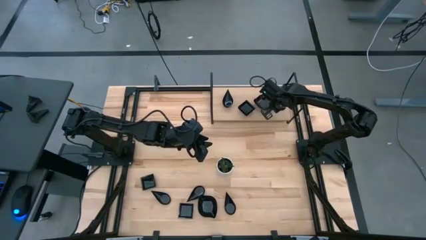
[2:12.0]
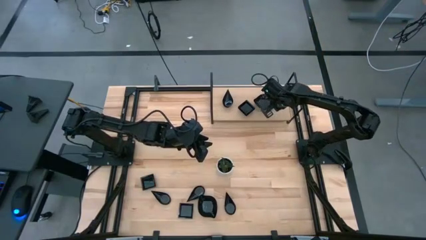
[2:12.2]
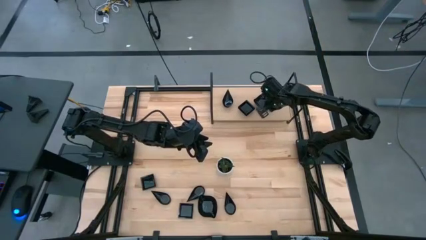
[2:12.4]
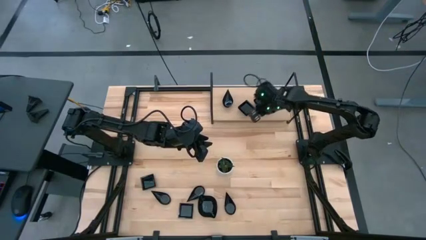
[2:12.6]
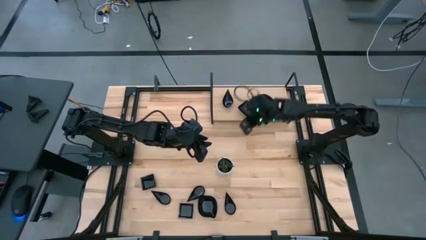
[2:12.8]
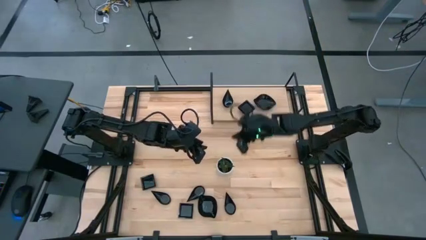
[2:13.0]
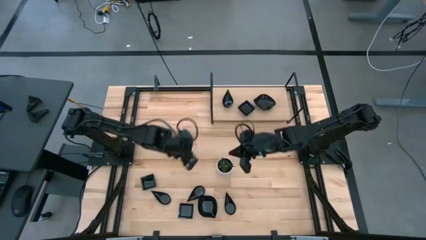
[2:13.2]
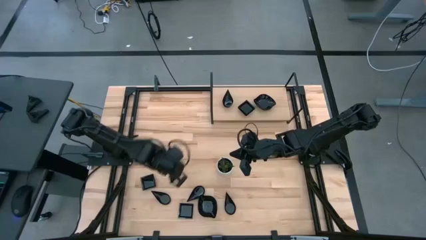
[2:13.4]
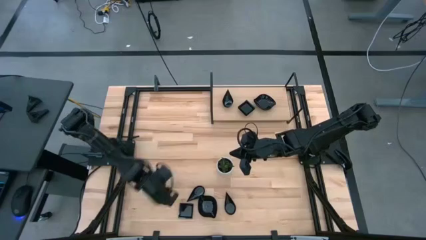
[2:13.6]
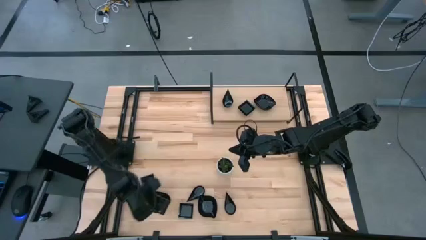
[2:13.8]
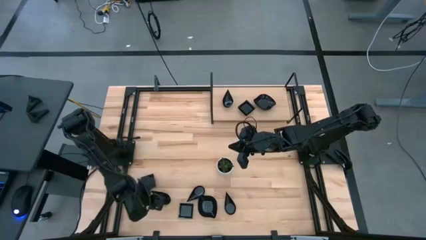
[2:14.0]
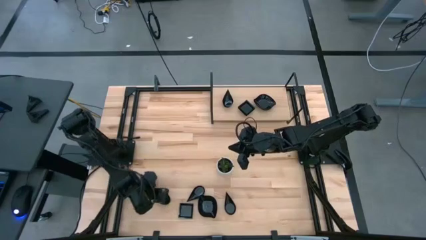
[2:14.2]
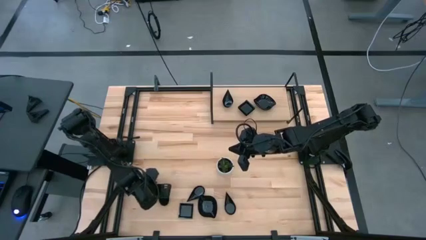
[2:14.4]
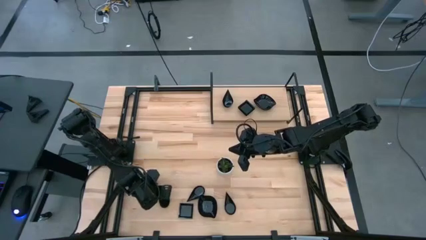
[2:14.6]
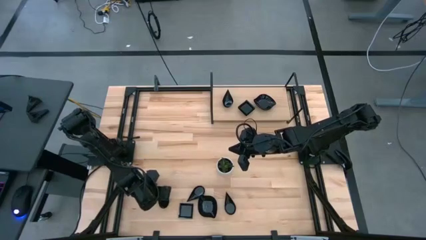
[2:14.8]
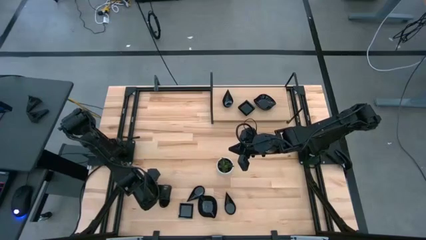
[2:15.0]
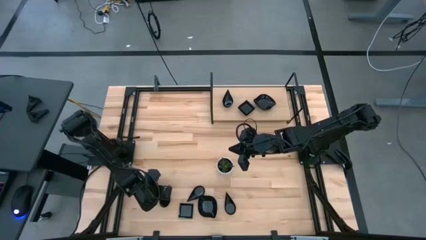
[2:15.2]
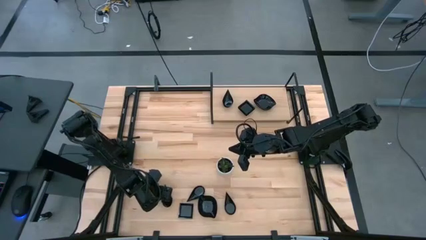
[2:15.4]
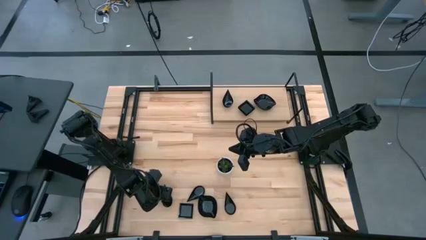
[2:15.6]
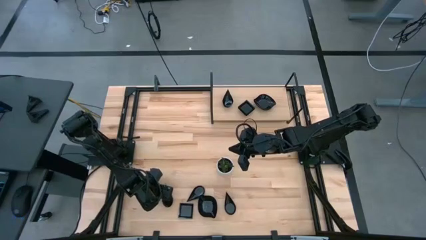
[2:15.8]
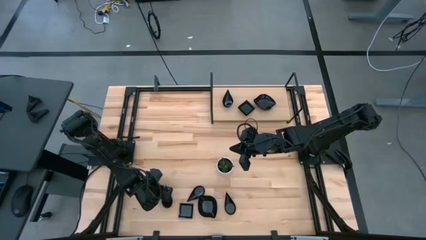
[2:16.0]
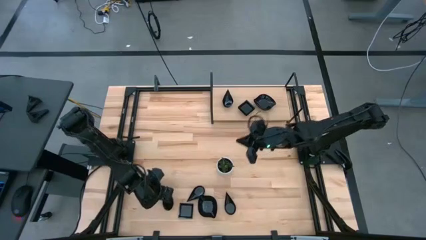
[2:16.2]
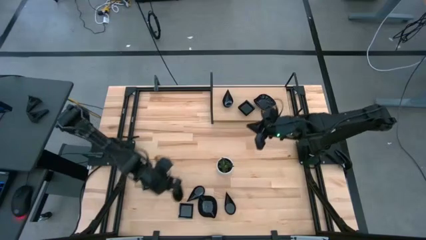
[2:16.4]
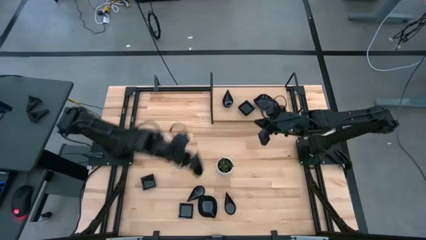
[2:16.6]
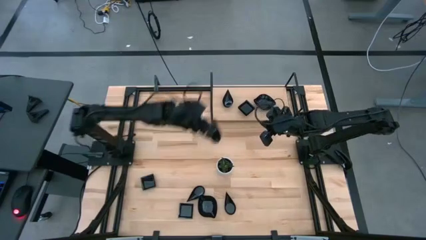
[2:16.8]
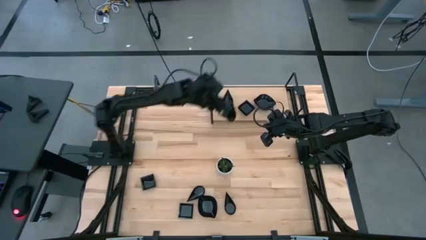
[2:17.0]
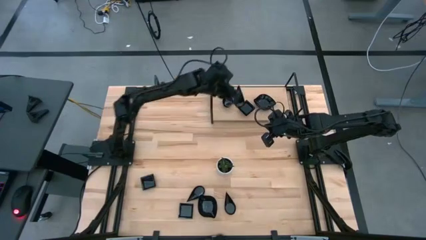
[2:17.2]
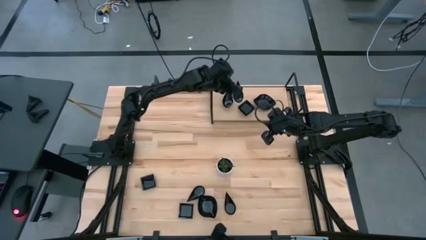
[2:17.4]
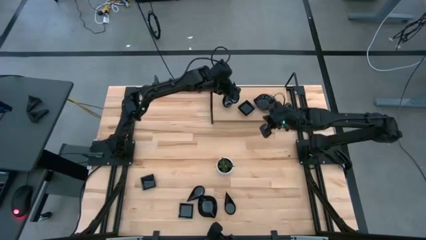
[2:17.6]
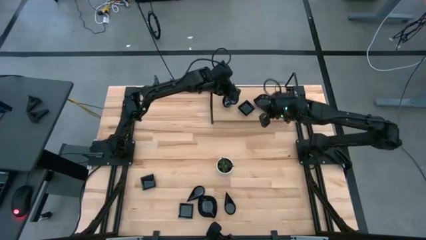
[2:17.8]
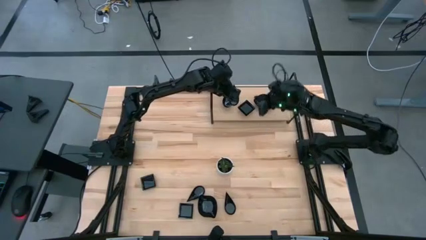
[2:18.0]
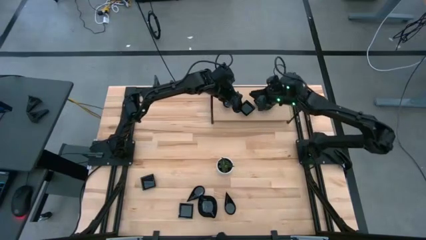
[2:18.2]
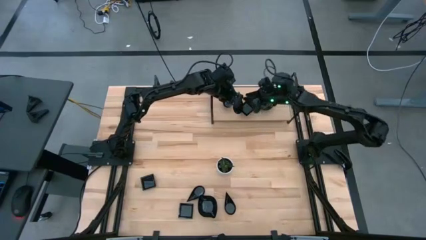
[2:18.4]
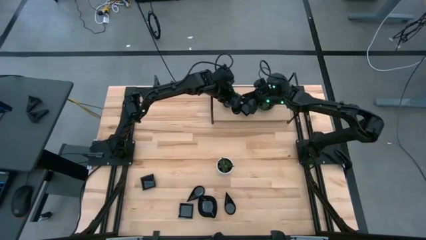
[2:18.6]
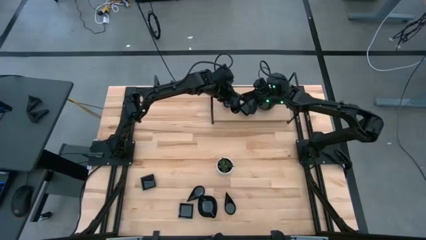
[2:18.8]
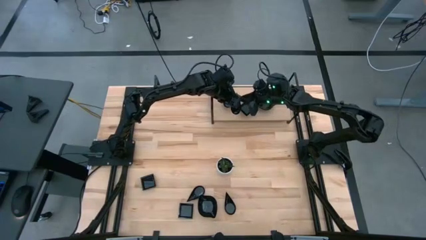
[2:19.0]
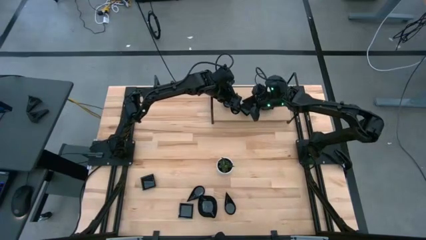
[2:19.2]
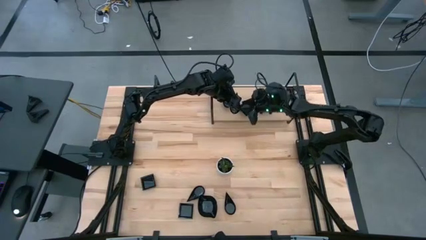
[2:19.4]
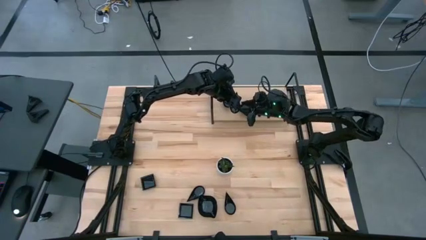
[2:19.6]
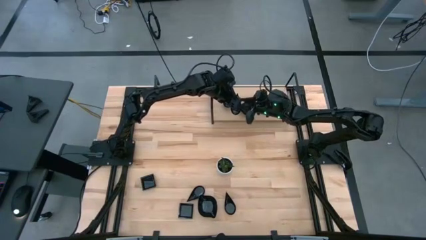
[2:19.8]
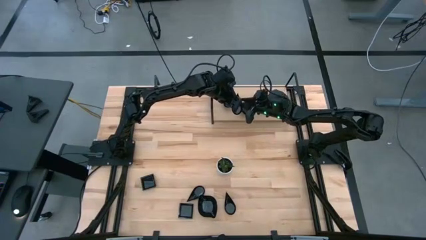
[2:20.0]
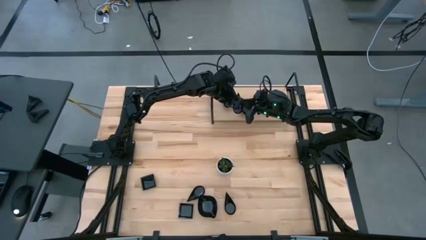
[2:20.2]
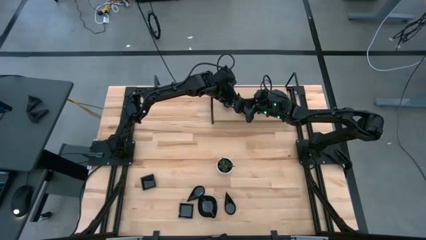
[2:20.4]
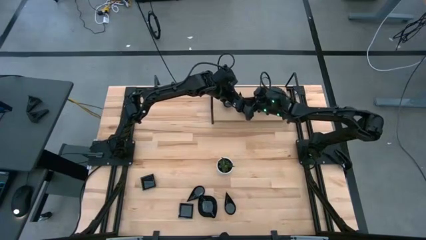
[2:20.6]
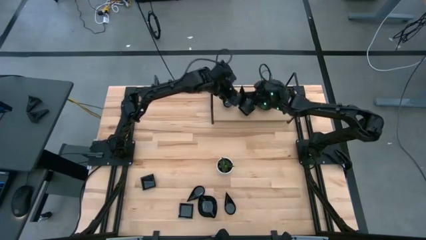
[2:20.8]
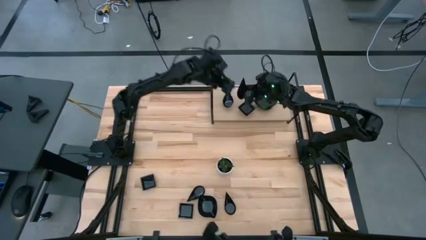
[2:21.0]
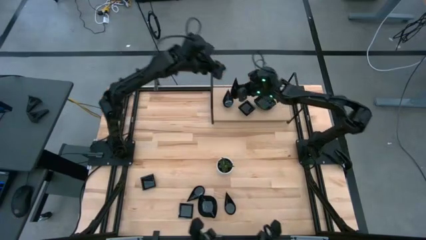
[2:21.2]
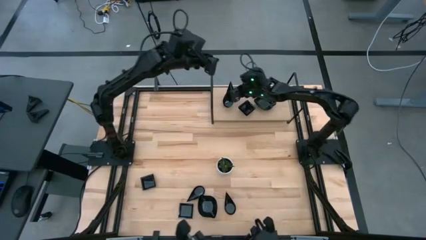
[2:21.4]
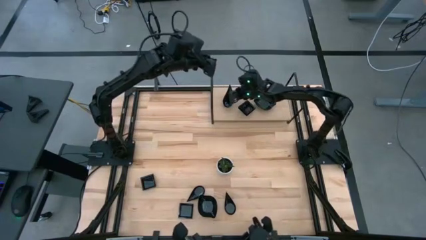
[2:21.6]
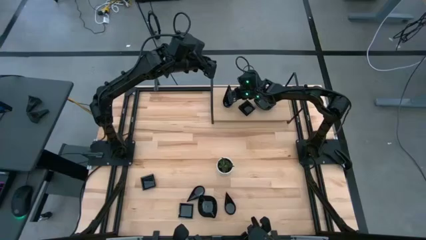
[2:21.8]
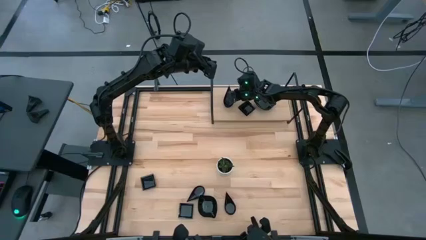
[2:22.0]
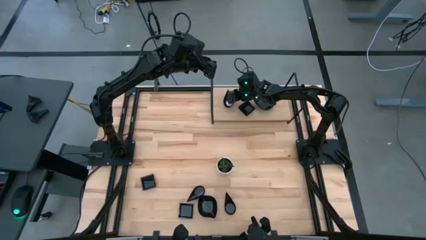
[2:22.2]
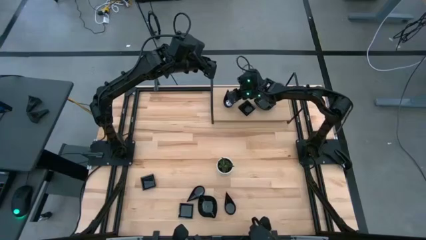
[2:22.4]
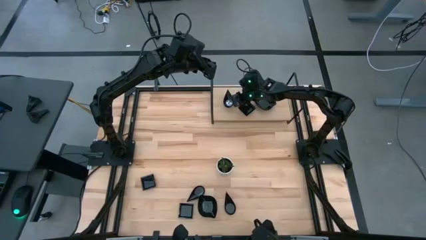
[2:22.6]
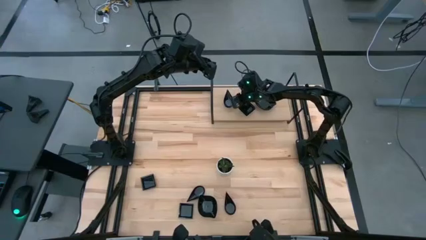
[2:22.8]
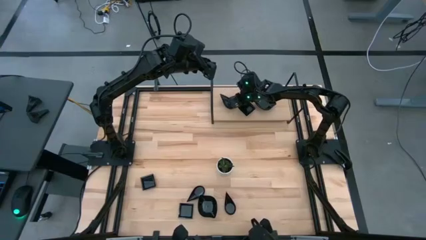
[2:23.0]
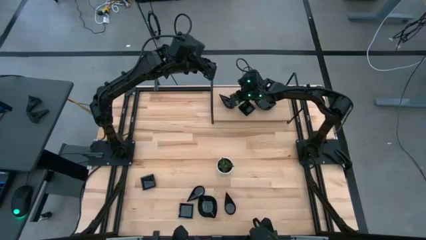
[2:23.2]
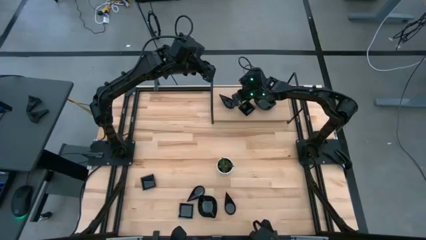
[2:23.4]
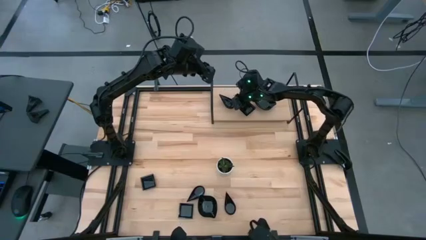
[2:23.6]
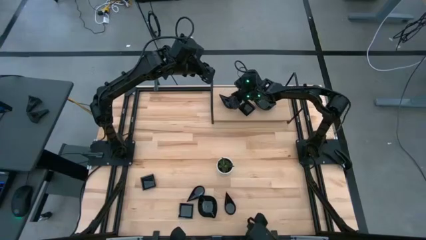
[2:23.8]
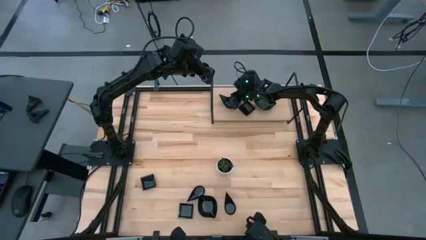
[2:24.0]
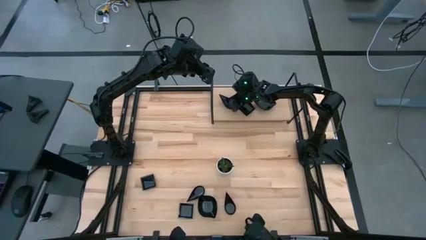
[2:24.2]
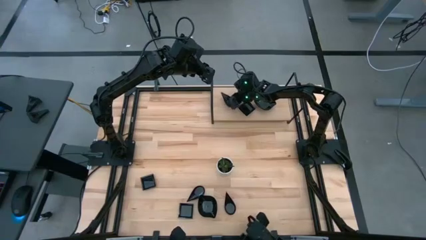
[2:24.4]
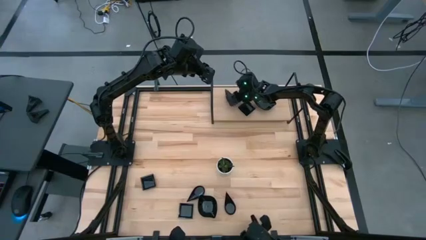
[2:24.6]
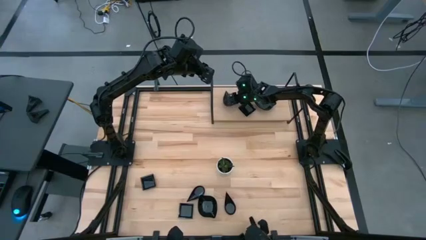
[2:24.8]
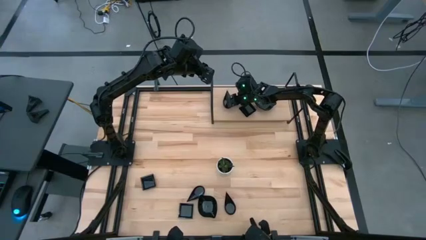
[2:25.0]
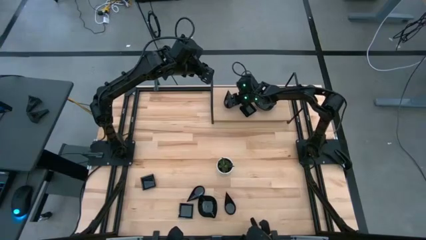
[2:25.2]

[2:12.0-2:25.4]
Task: Pick & Place Mini shaped plates
Stack the drop shaped plate on top of the drop shaped plate on the shelf
